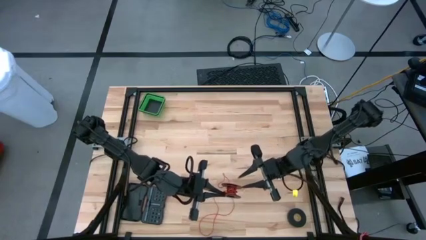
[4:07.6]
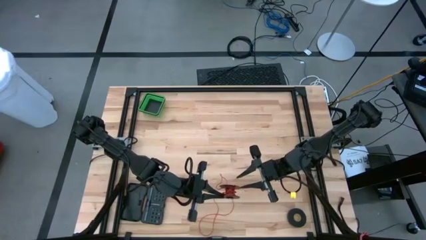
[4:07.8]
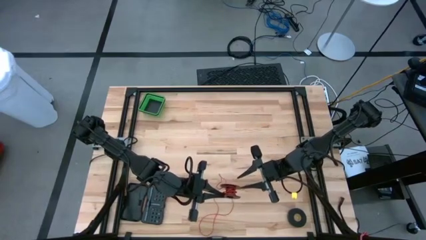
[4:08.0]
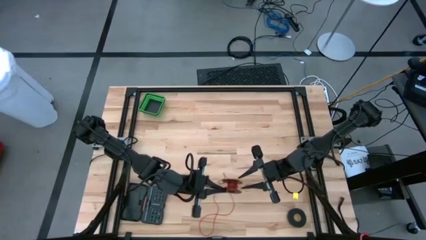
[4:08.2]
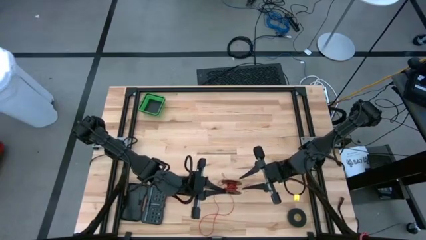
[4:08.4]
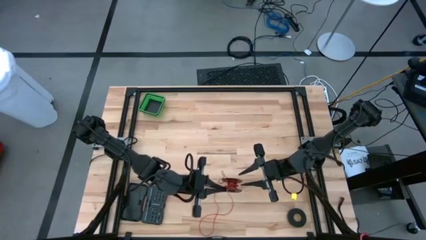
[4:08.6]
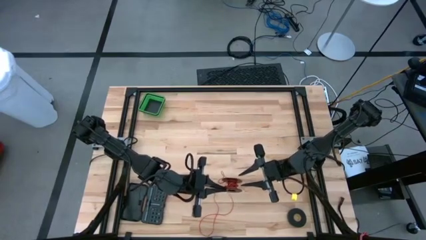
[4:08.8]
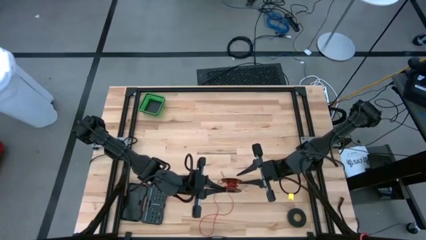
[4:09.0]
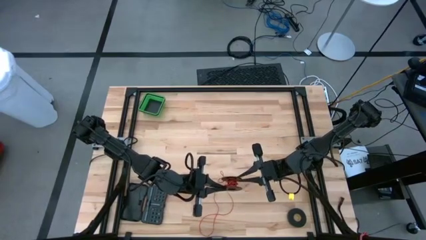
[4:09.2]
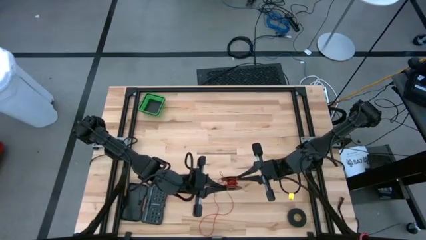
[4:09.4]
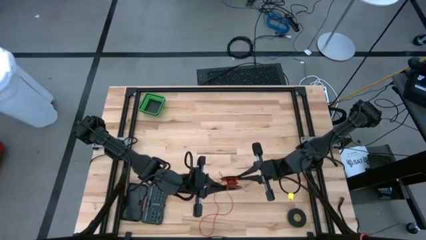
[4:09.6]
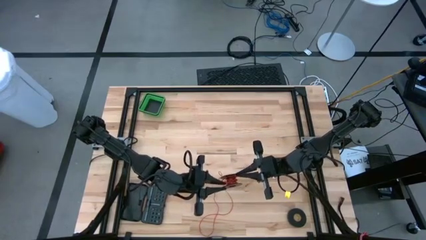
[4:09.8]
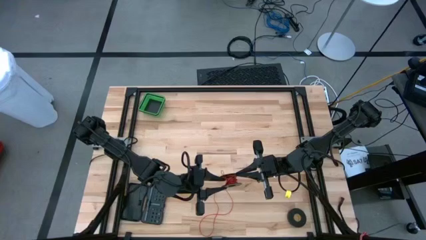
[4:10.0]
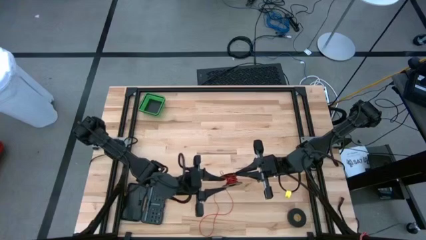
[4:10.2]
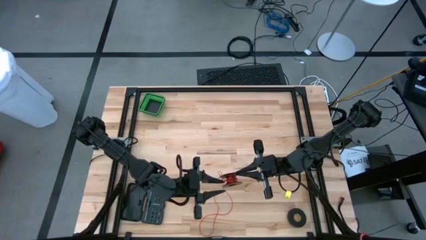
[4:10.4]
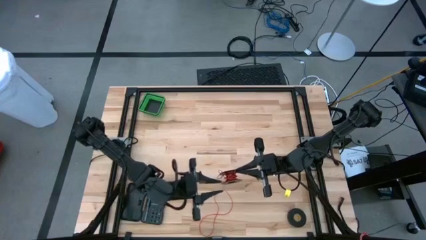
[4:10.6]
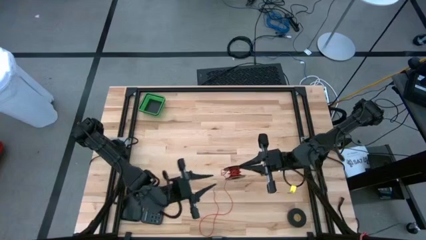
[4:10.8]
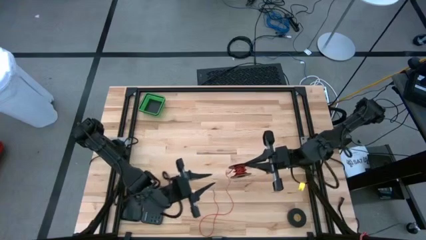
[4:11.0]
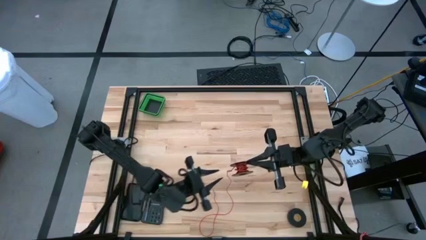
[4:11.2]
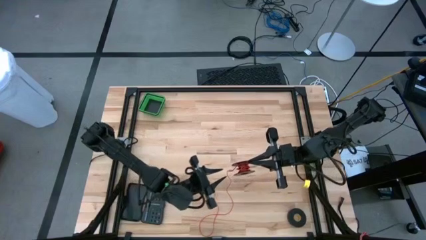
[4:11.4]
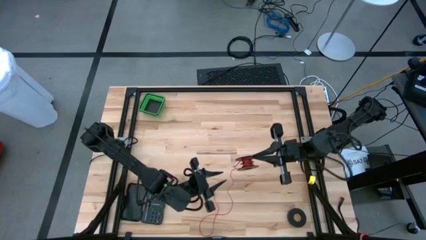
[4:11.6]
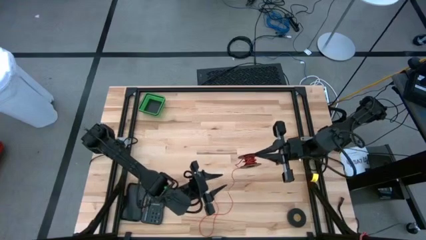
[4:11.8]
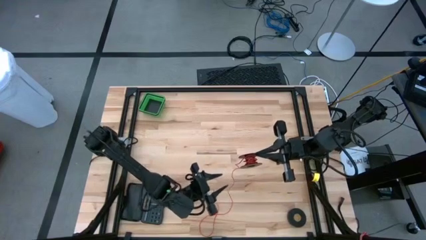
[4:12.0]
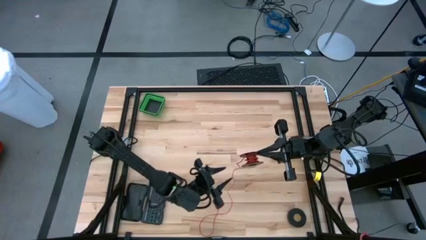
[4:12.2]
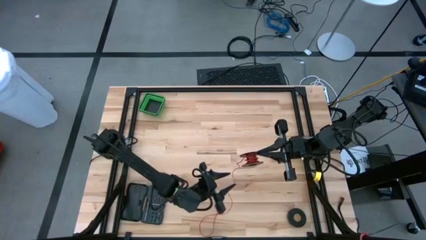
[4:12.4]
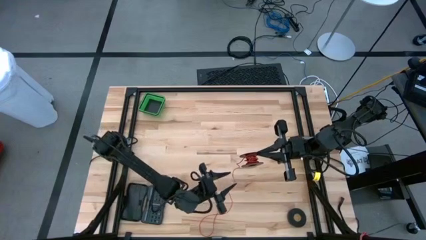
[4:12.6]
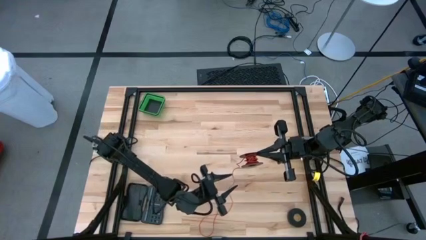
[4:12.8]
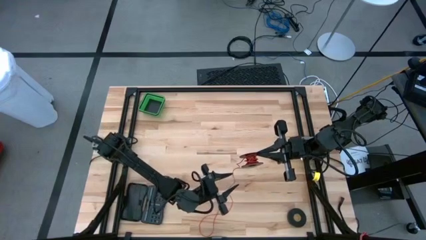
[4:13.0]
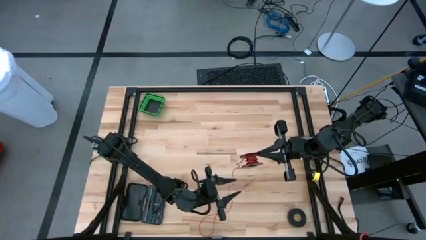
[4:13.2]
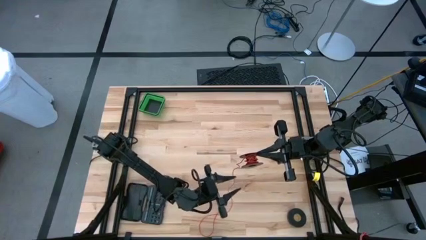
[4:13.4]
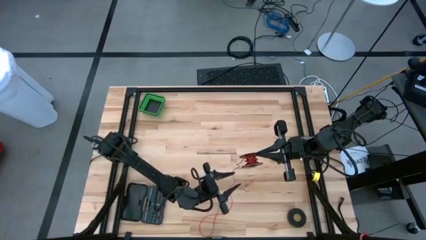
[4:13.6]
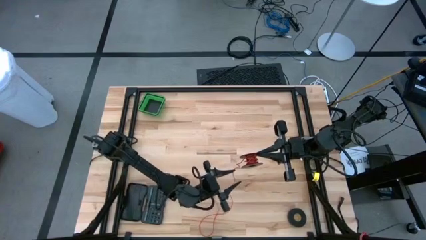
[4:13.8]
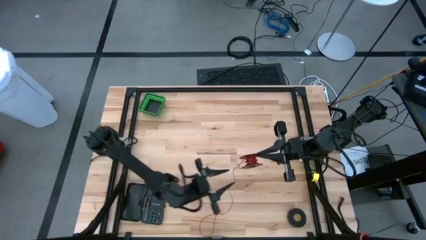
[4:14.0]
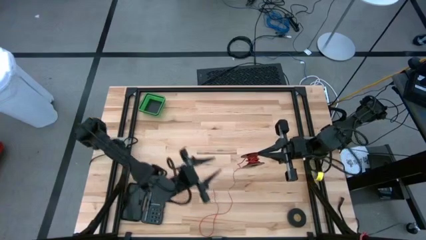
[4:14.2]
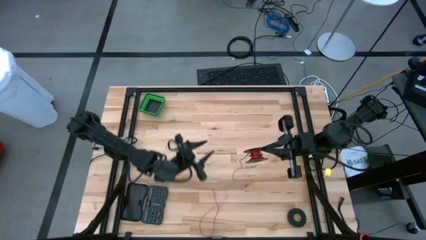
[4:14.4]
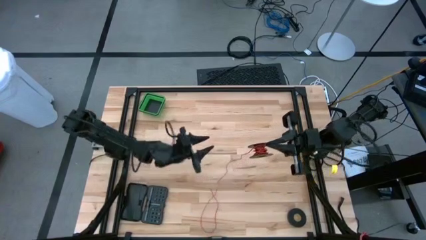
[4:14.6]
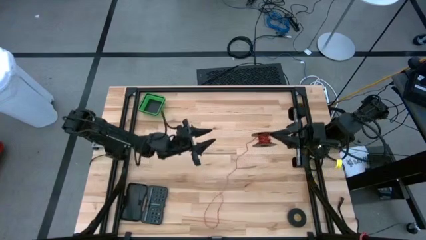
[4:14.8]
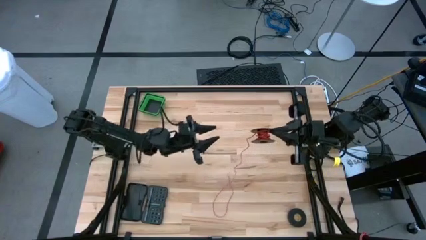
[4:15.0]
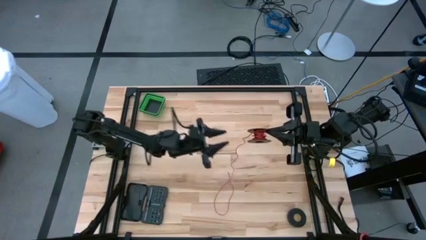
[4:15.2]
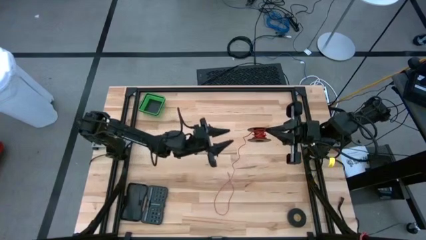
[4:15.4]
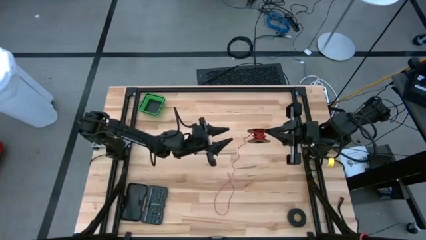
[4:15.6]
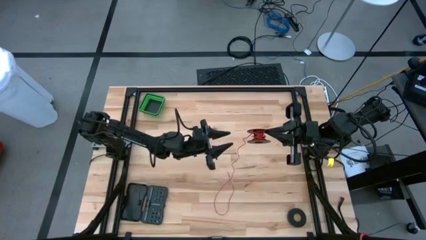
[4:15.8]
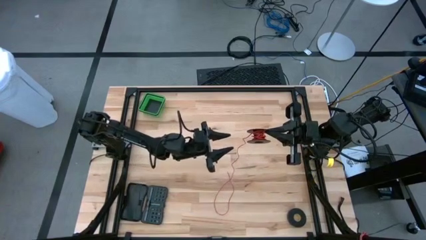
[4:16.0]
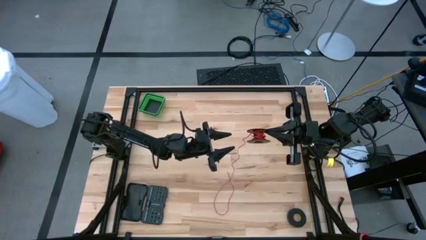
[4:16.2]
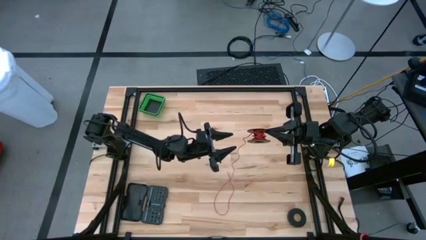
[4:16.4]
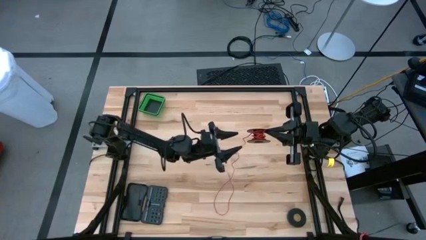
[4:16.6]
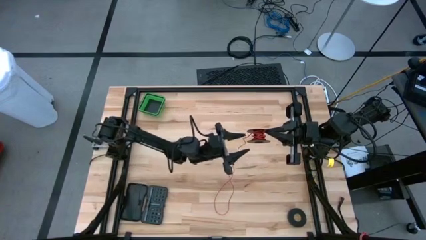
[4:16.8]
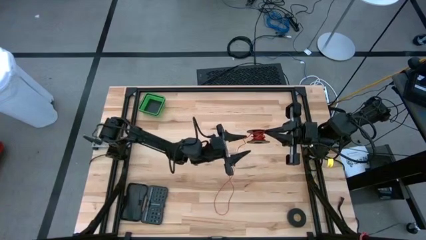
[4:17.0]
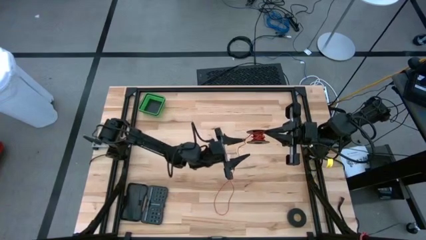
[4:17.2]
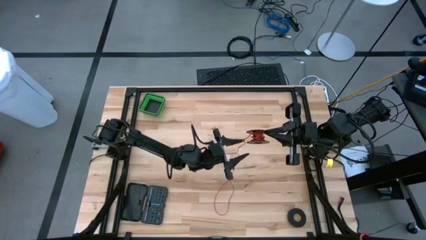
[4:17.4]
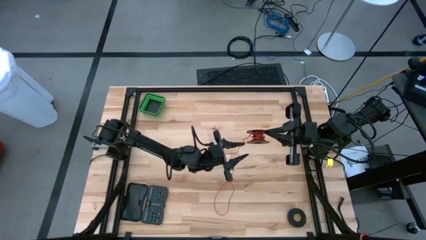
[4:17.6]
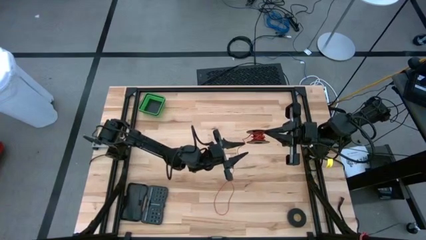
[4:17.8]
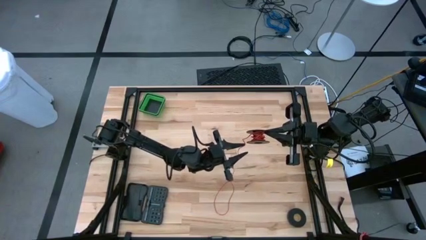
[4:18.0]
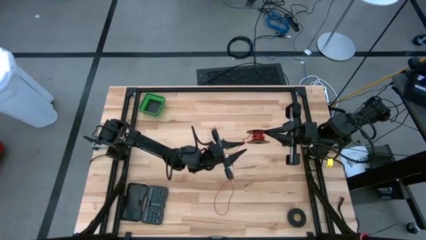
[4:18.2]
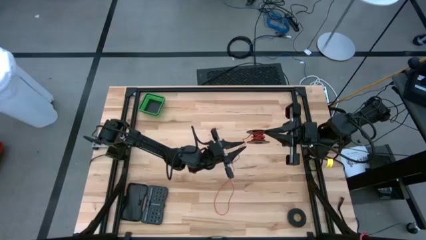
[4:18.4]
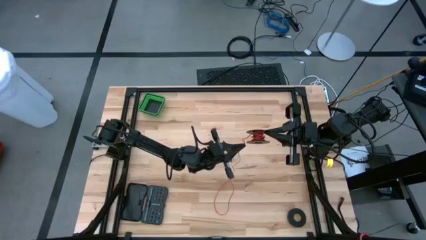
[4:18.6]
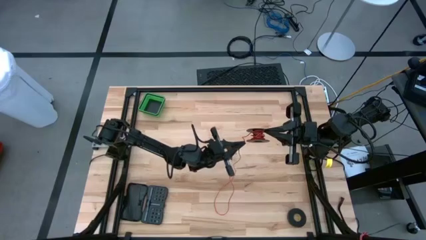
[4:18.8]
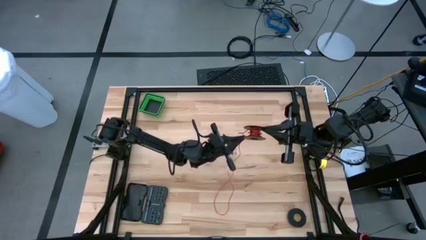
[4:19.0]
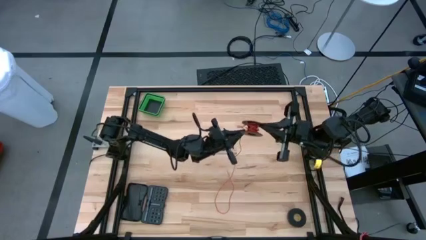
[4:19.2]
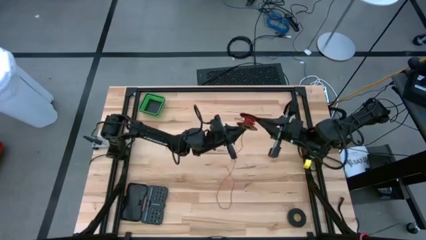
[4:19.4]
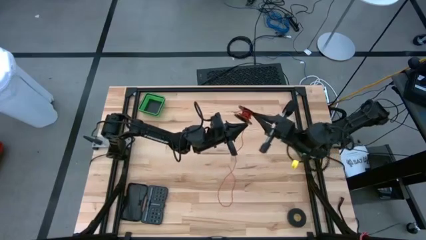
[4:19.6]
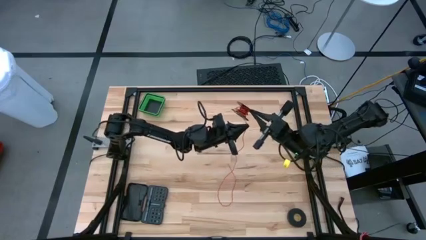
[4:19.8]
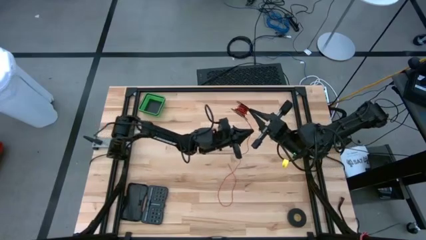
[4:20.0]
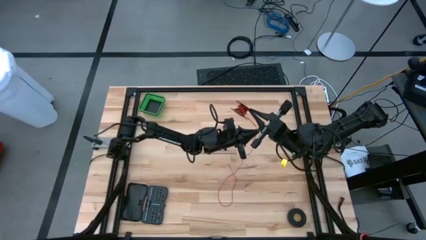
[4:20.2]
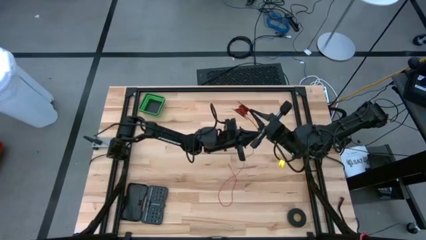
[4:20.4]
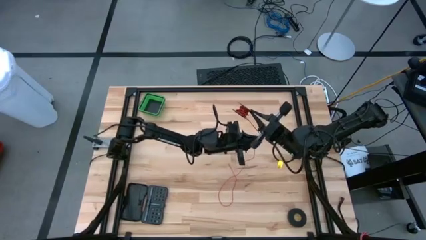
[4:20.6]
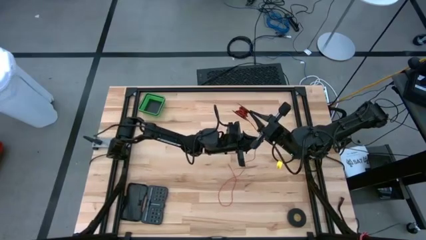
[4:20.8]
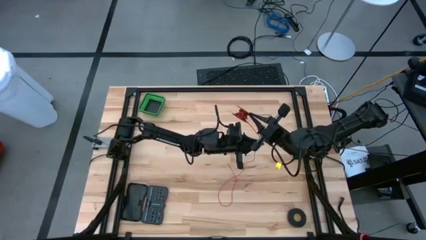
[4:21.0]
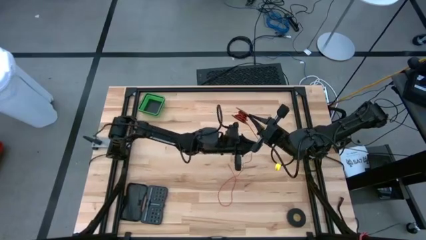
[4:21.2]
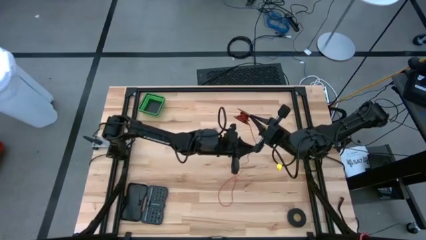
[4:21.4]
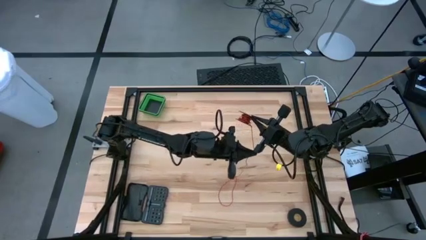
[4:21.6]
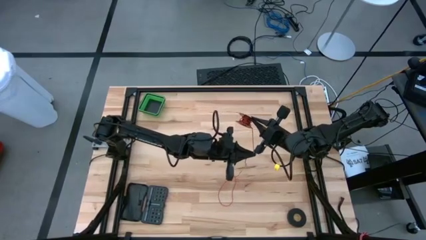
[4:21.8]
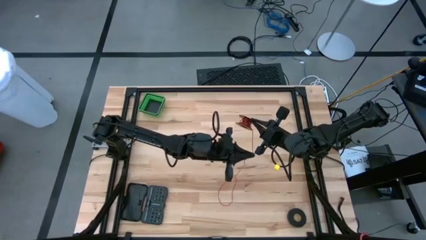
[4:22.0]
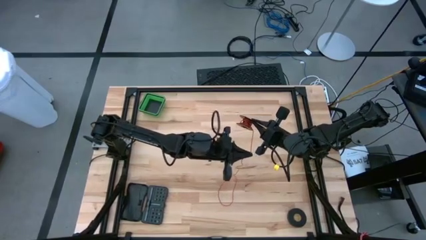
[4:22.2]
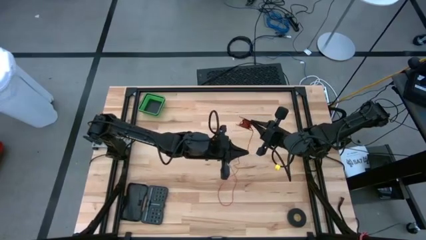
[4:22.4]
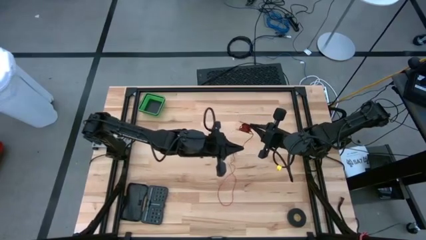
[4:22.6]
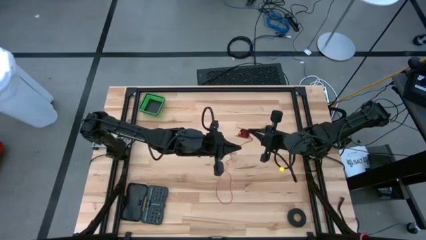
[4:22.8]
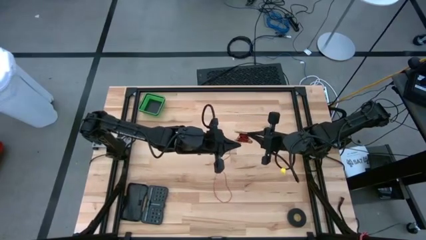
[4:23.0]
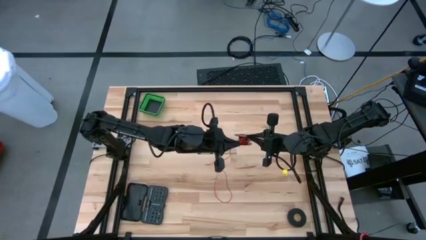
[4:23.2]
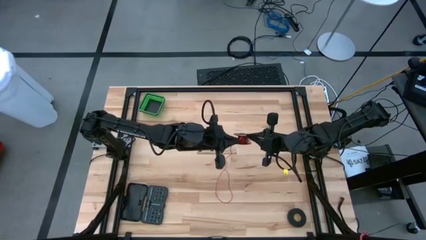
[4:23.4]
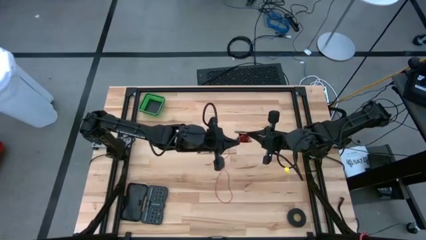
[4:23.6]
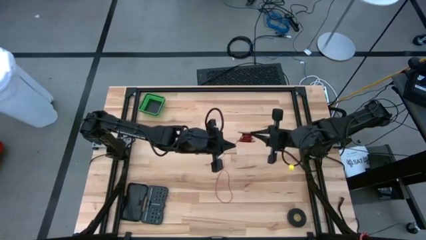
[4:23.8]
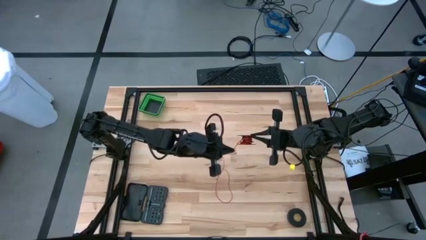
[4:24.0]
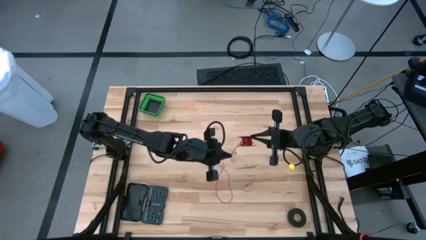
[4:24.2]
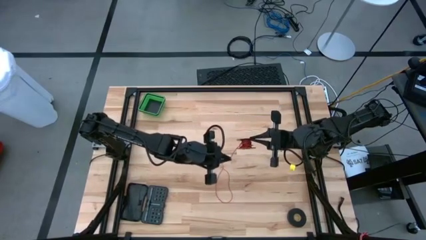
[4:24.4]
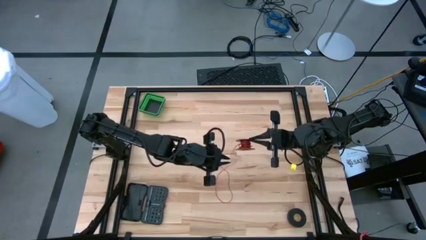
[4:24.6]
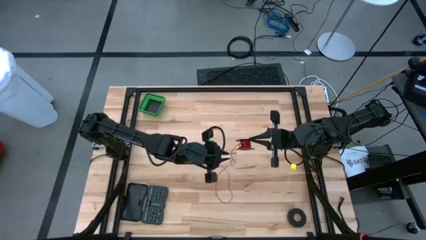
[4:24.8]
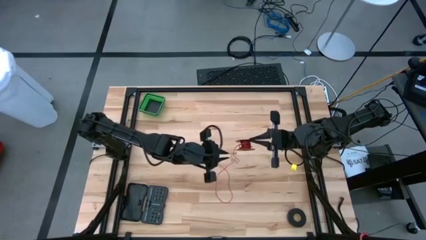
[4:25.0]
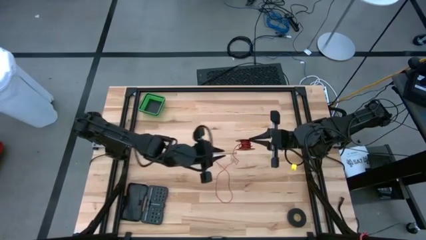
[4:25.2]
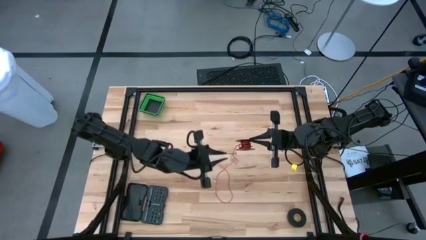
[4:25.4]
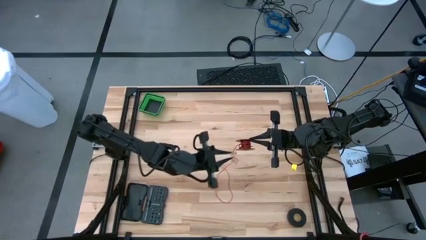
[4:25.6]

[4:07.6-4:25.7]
Task: Coil cords
Coil the red wire into the spool
